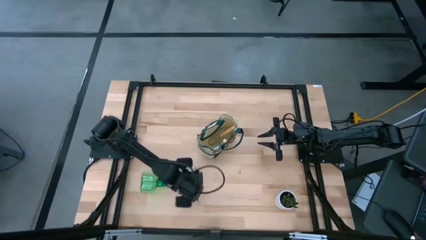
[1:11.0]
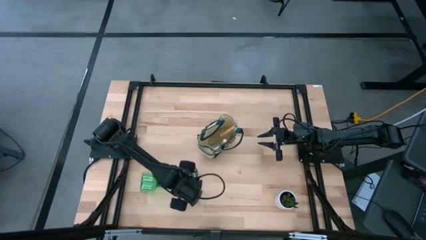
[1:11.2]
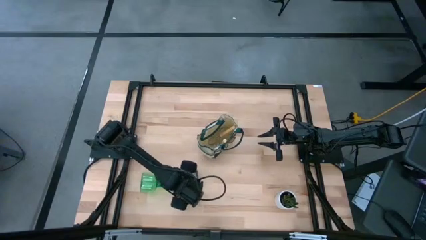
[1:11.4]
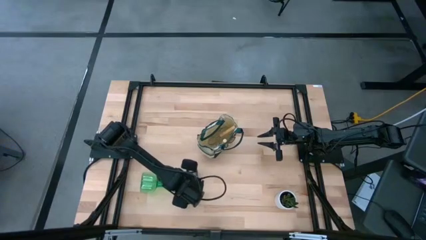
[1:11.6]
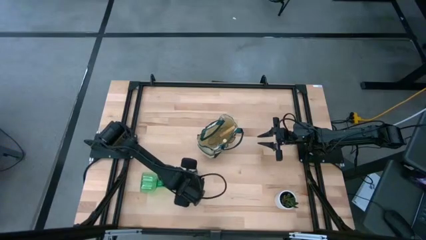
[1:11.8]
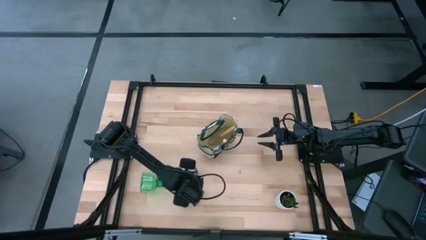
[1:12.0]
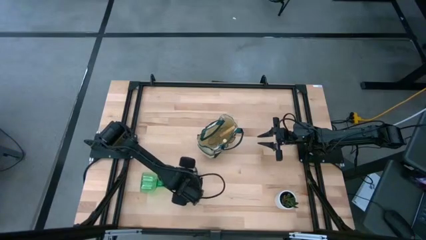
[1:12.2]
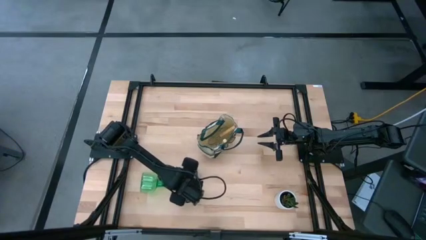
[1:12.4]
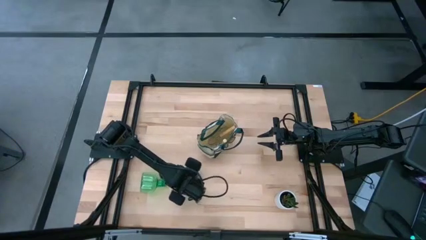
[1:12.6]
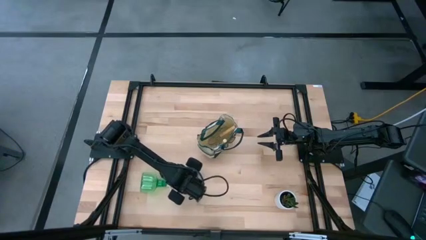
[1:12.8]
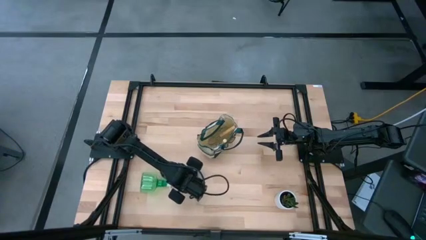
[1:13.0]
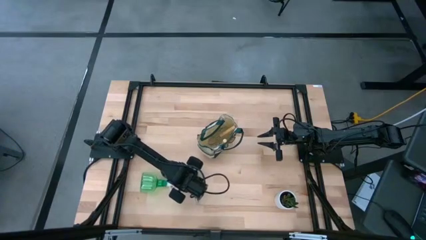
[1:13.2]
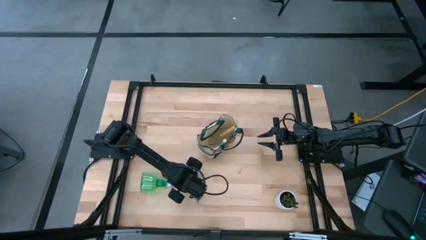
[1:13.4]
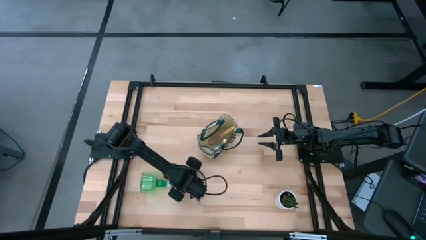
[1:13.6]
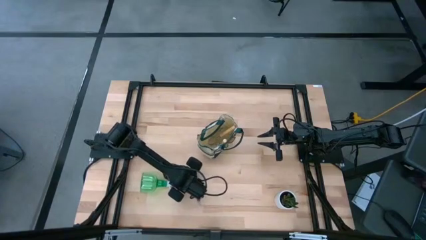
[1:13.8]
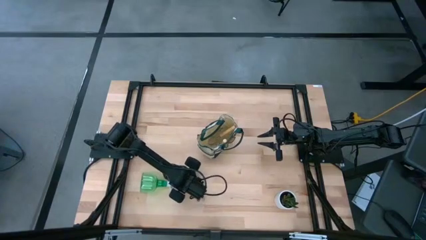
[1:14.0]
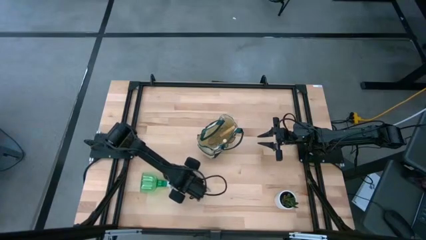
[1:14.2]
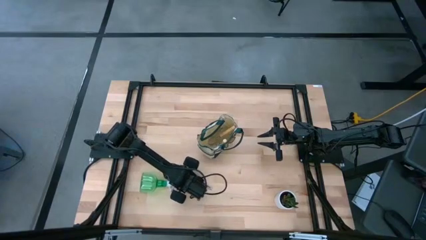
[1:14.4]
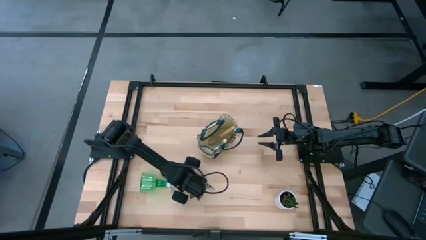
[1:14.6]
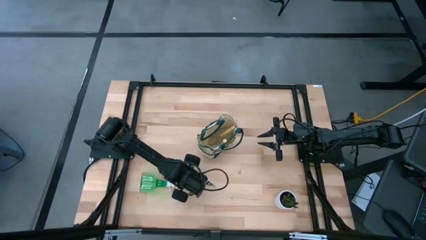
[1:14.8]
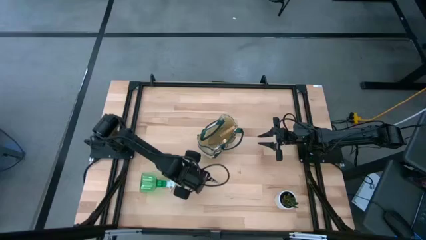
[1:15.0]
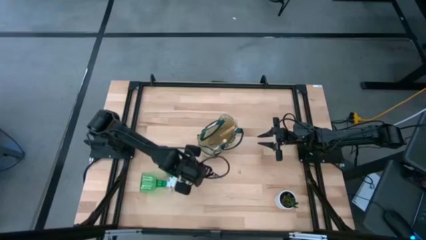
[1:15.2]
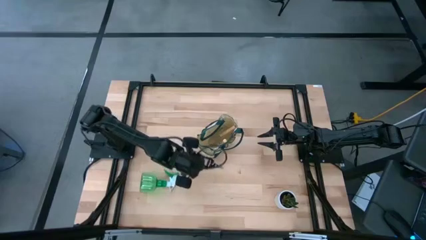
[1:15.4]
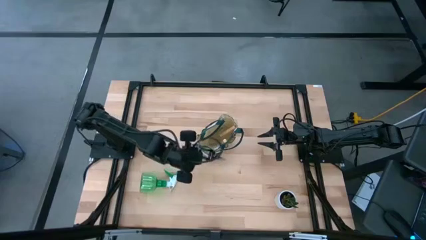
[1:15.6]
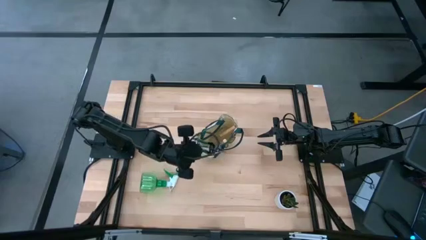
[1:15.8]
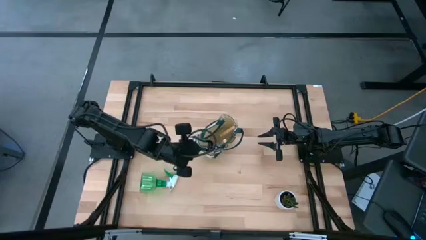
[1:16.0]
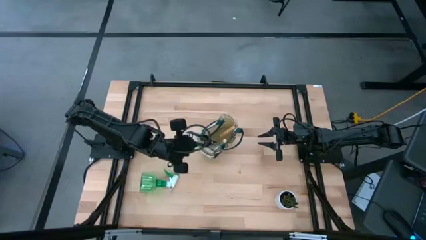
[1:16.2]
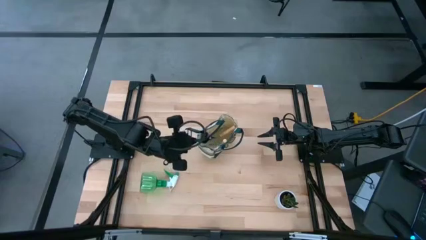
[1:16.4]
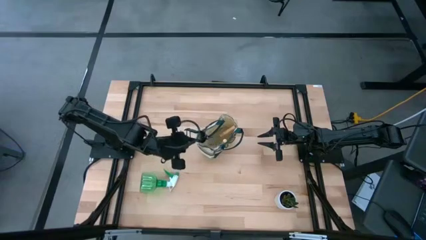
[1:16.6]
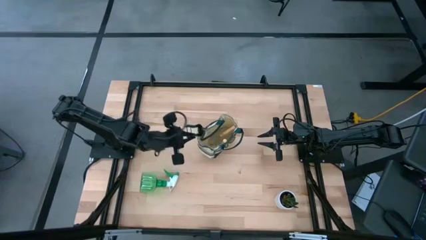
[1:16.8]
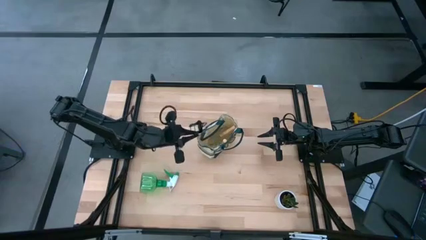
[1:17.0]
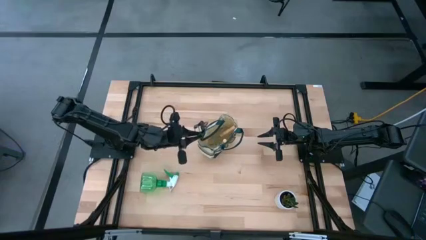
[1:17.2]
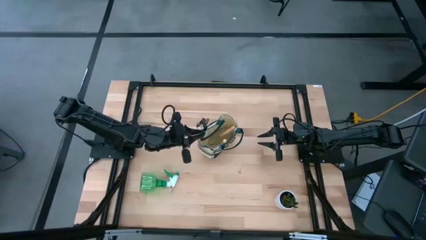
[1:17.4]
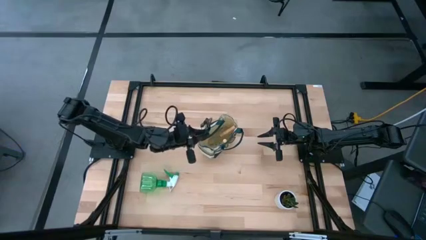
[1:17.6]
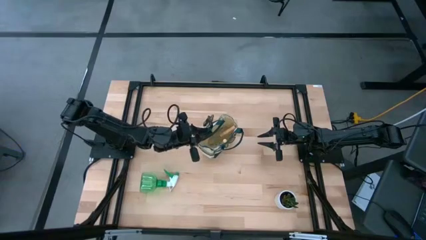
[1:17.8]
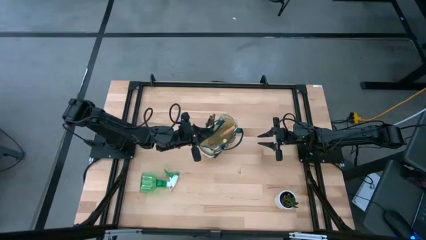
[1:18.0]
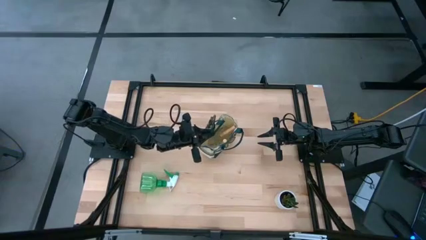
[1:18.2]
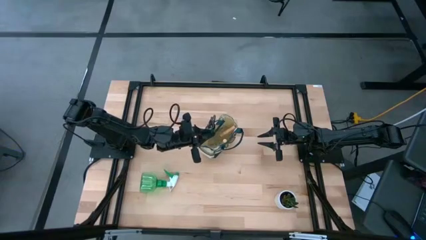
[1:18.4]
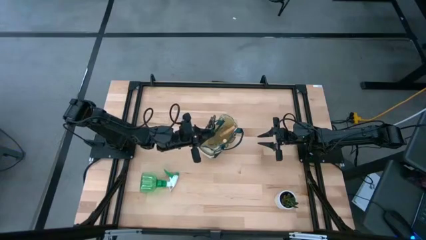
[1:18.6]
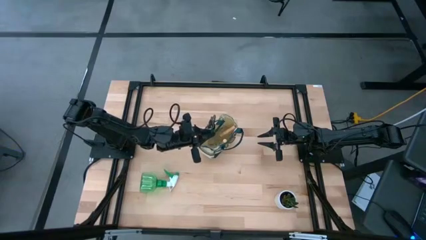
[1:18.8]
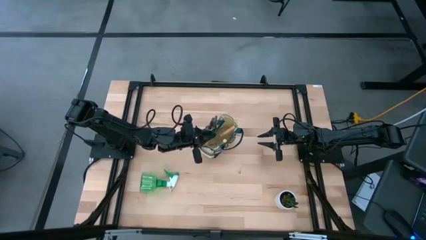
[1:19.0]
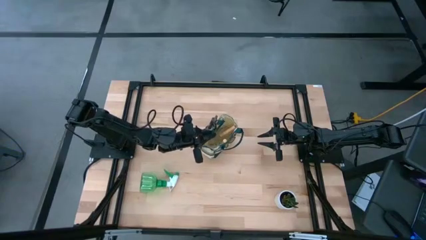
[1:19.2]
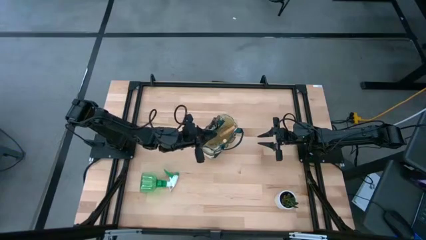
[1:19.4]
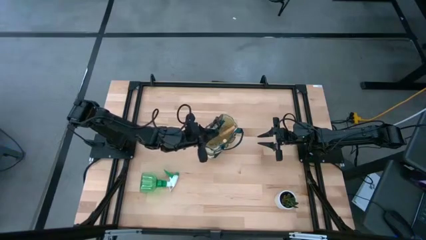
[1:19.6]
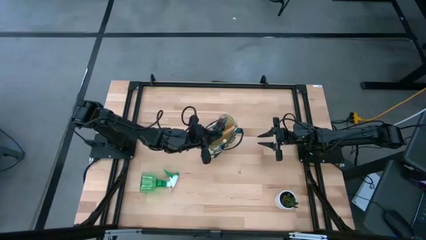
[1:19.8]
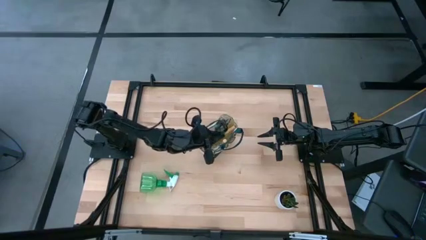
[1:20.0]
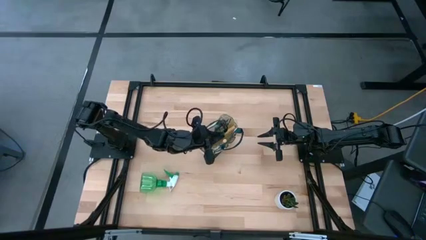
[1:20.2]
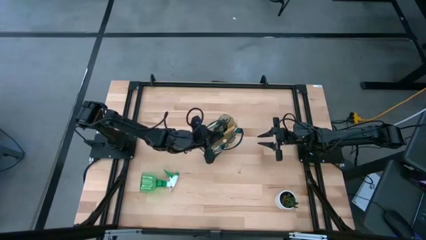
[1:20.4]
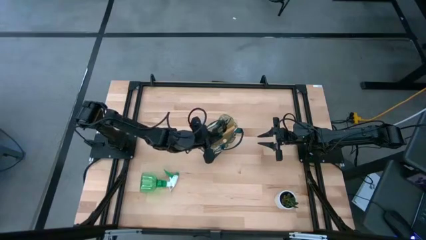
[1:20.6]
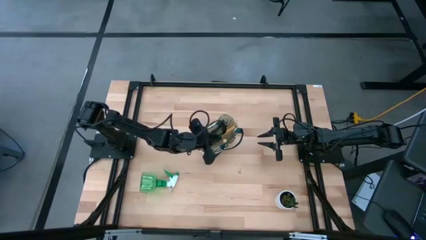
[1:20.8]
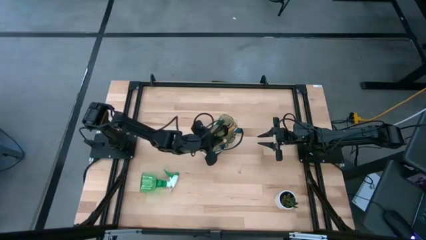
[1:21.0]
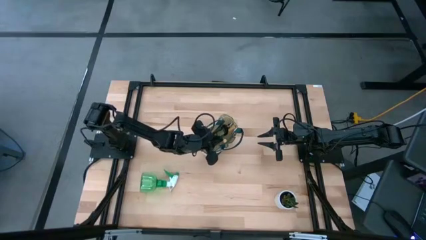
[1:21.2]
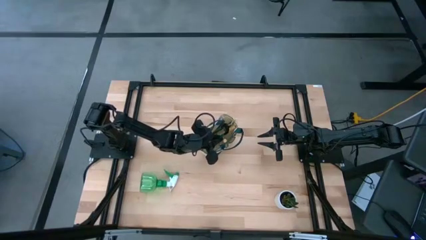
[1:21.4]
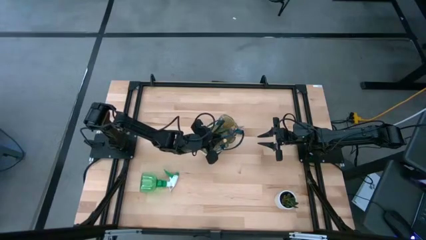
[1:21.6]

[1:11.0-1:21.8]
Task: Pick & Place Garden tools in Gardening bag
Put the shear scissors into the gardening bag

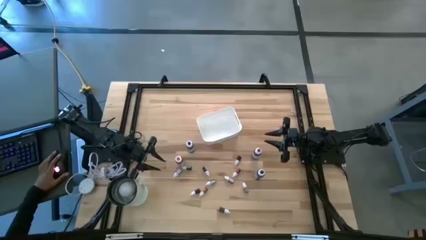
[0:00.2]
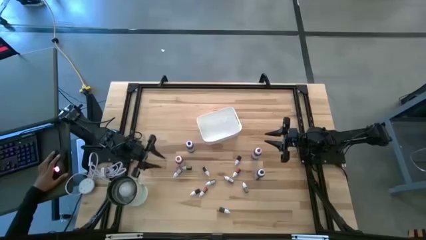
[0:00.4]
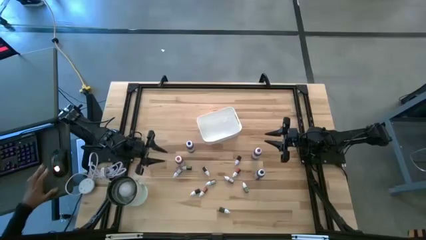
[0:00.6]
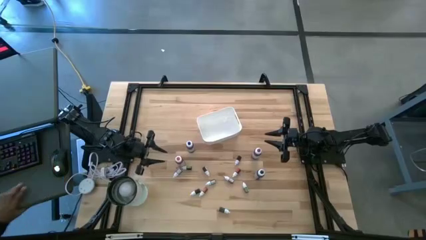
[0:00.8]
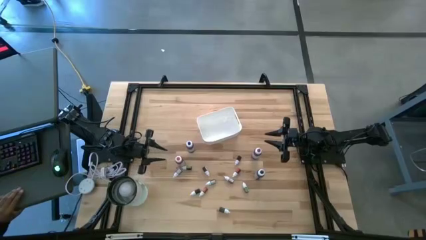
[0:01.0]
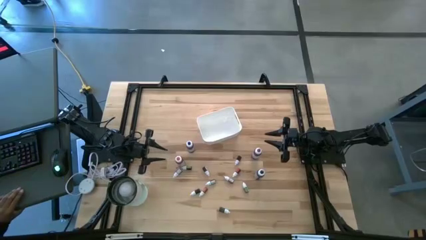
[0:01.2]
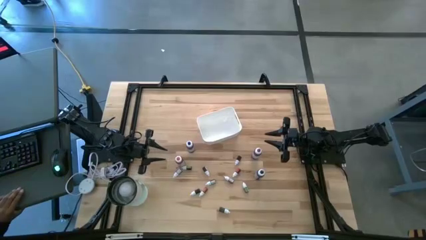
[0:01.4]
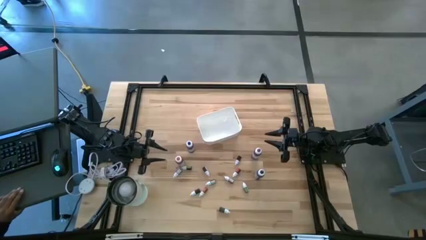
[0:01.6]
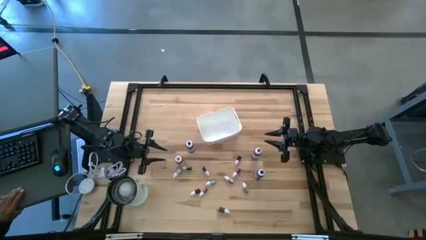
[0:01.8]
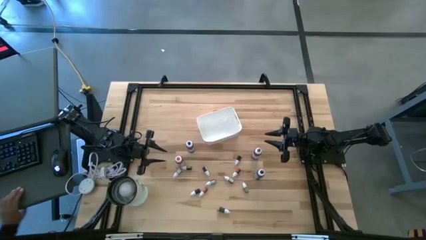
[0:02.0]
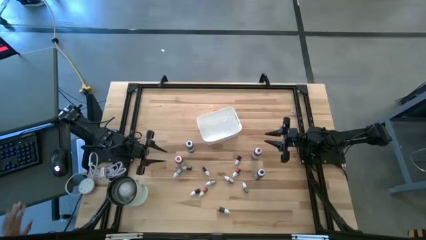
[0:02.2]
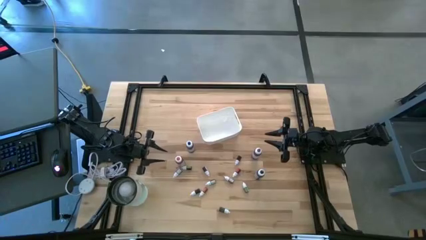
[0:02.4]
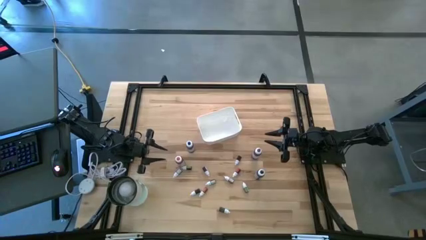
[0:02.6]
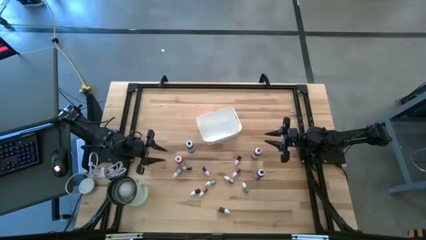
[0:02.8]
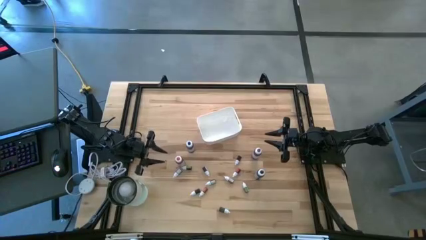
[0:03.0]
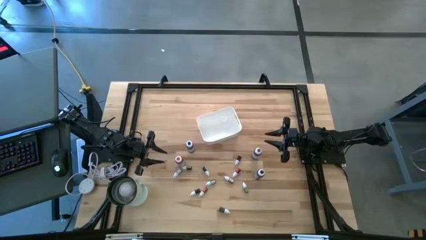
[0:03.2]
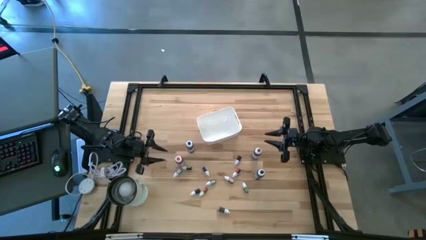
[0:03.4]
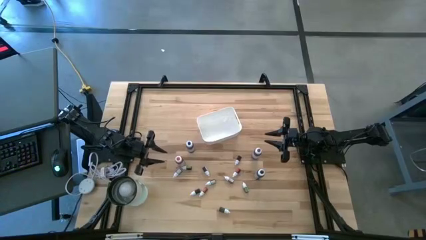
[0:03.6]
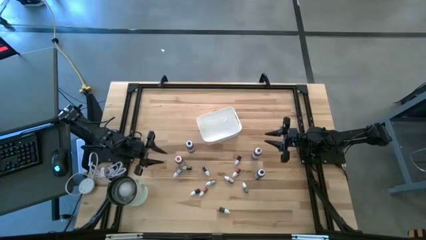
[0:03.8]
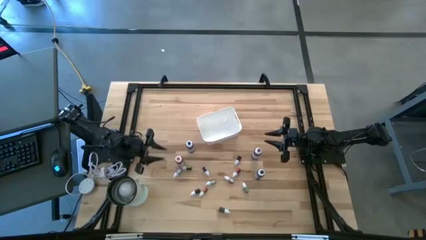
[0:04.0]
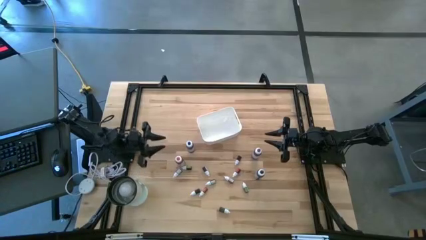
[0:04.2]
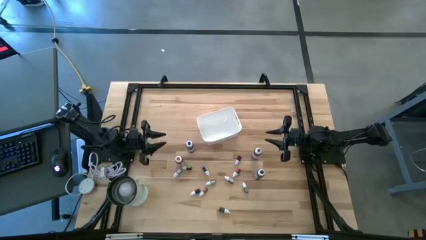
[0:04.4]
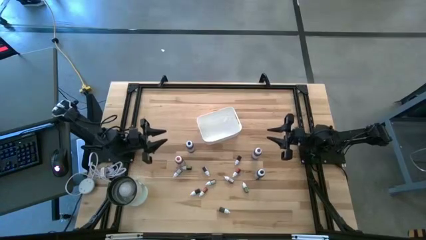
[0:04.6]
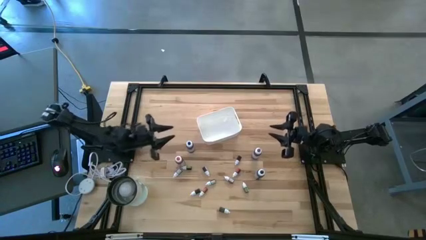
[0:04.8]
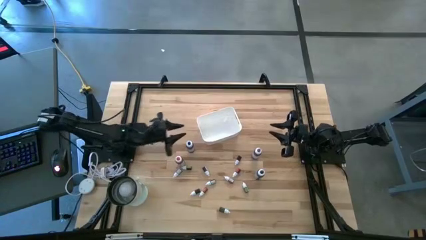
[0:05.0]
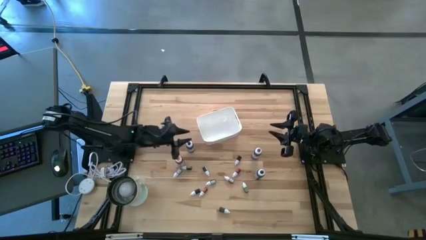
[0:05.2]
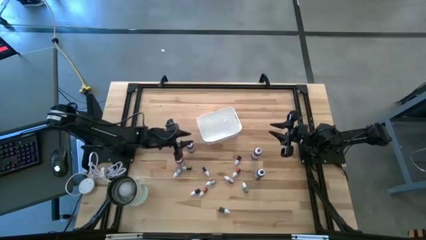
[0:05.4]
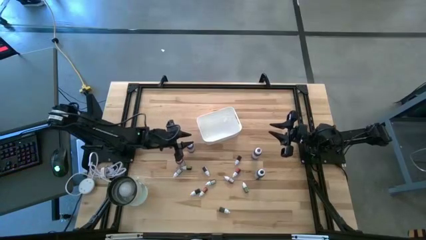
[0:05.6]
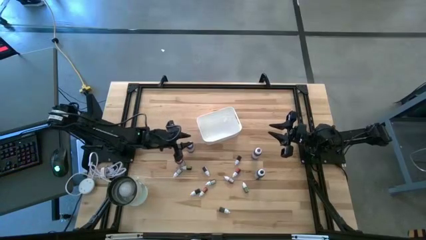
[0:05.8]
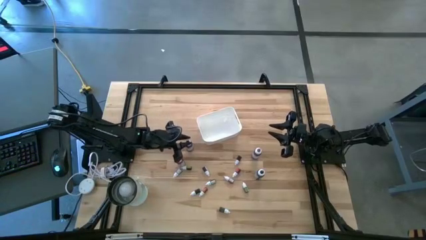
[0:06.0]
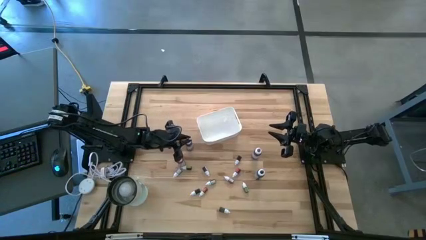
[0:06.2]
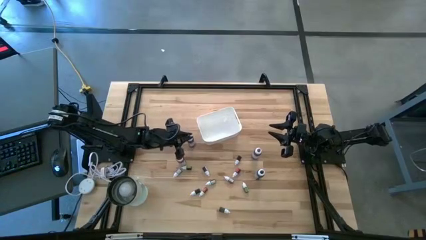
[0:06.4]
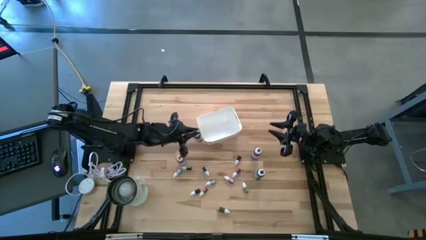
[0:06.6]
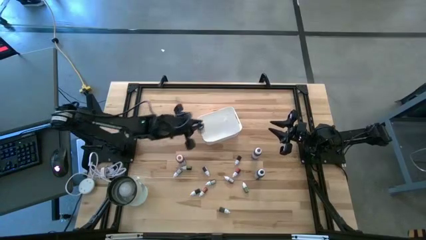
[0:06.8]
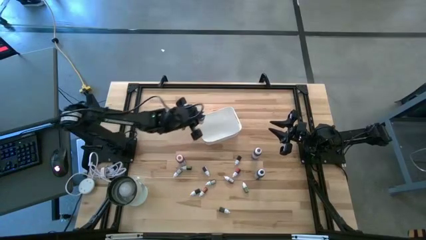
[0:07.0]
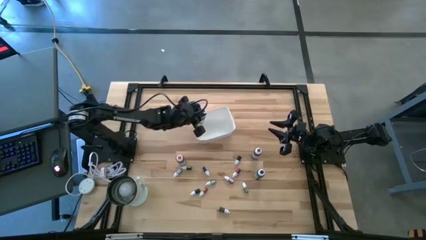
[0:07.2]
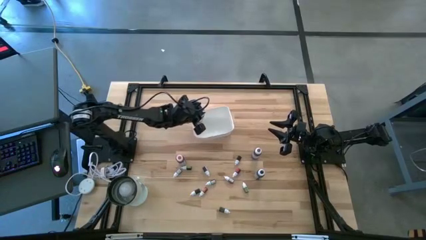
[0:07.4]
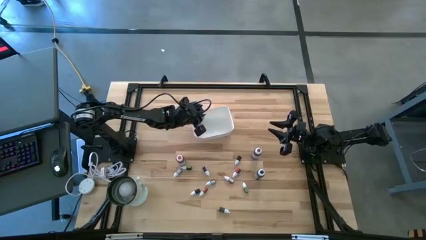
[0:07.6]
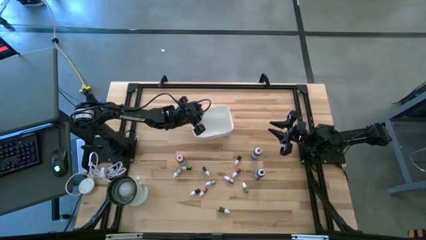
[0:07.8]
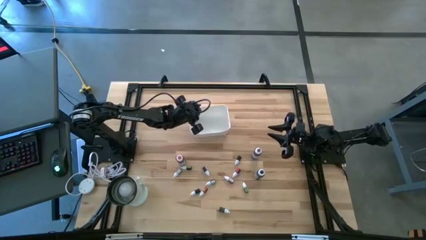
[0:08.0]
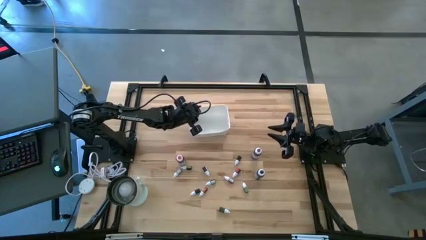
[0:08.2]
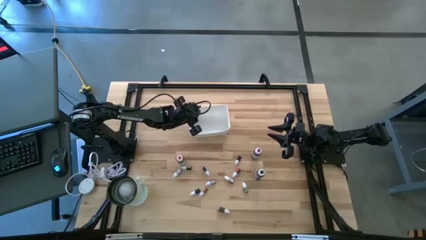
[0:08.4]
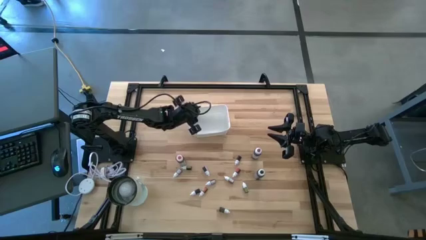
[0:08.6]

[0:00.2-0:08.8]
Task: Pick & Place food coloring
Put the large blue food coloring bottle into the white bin
